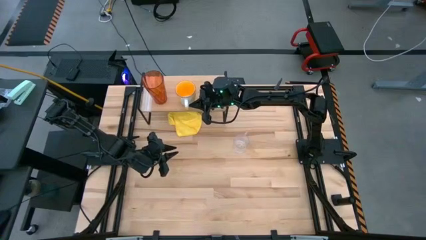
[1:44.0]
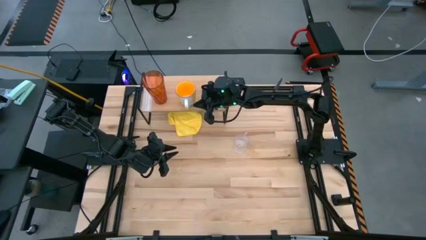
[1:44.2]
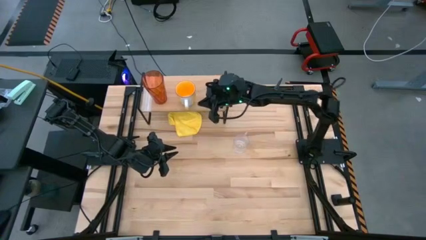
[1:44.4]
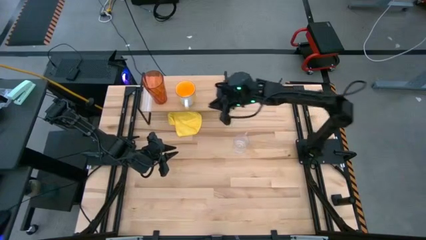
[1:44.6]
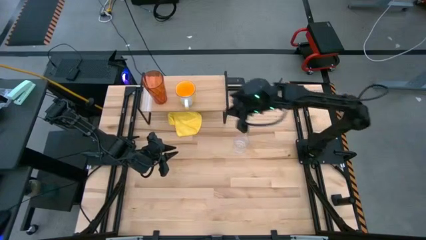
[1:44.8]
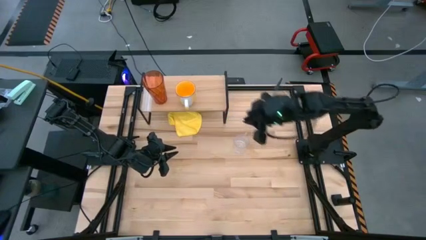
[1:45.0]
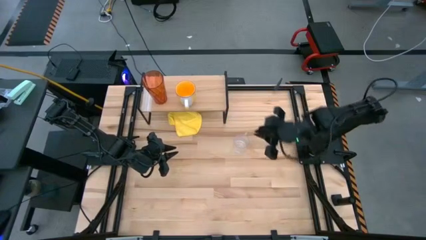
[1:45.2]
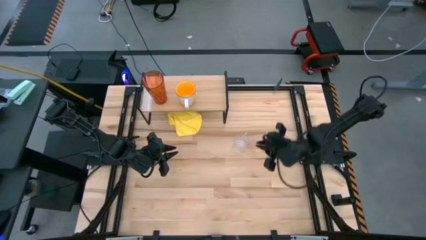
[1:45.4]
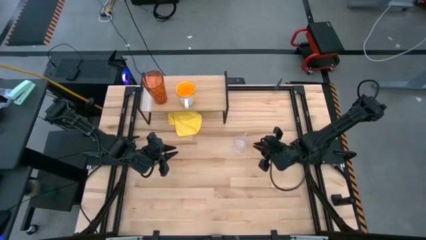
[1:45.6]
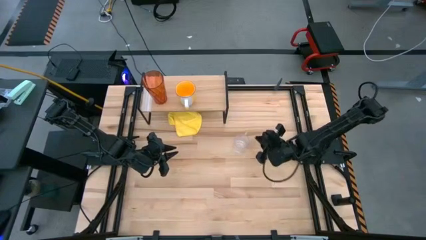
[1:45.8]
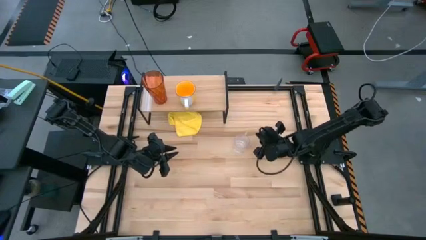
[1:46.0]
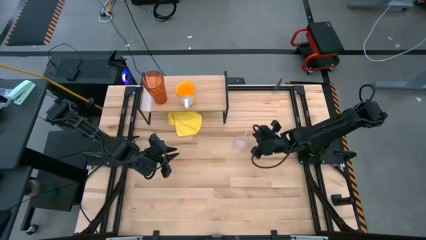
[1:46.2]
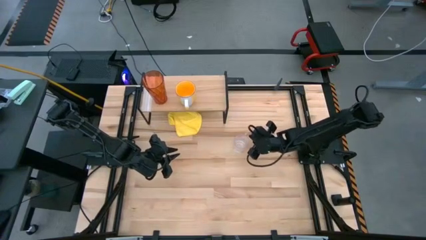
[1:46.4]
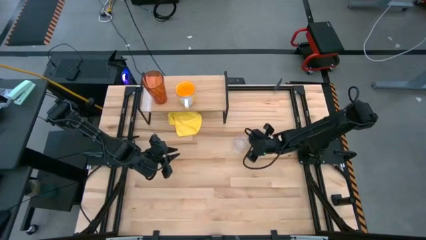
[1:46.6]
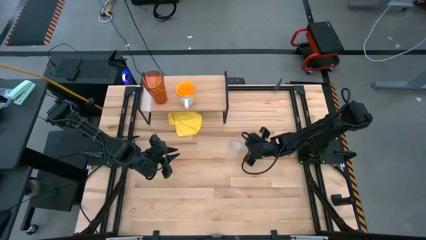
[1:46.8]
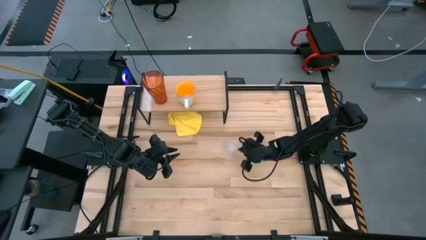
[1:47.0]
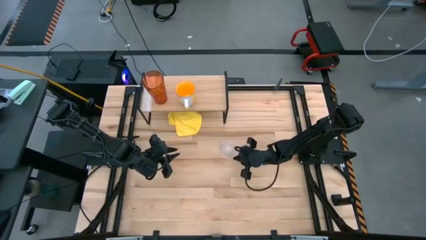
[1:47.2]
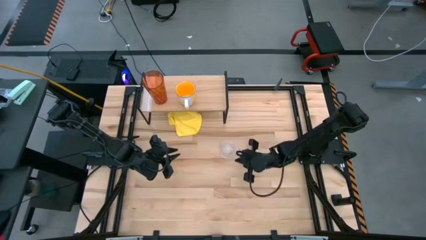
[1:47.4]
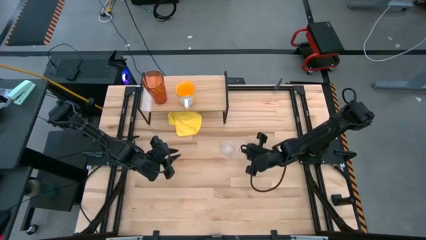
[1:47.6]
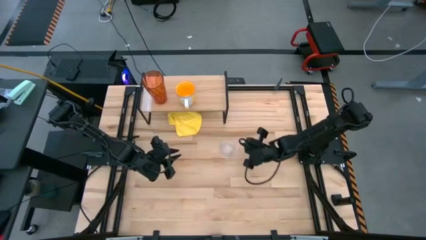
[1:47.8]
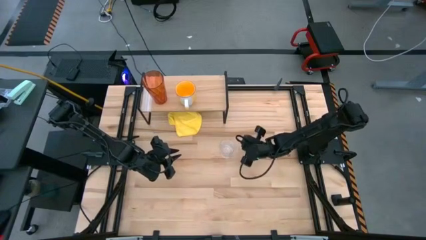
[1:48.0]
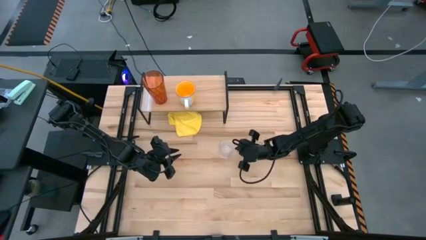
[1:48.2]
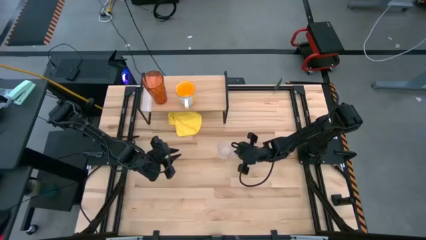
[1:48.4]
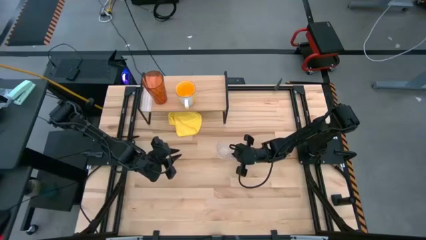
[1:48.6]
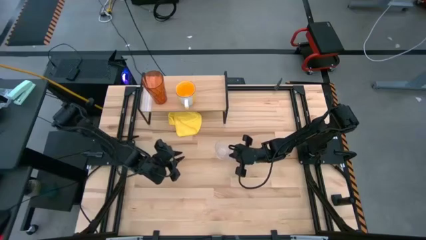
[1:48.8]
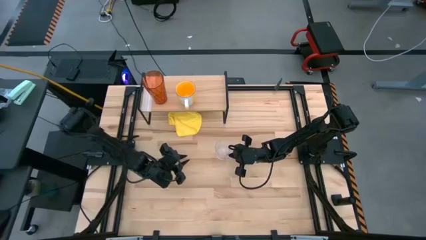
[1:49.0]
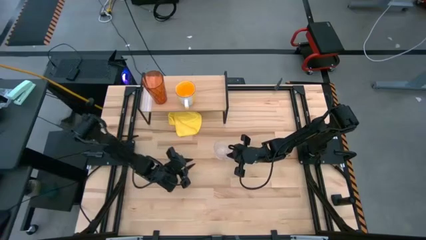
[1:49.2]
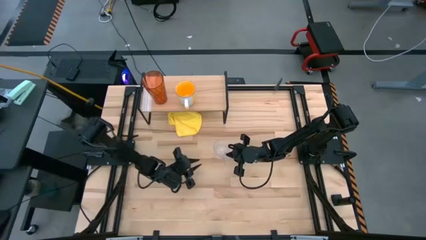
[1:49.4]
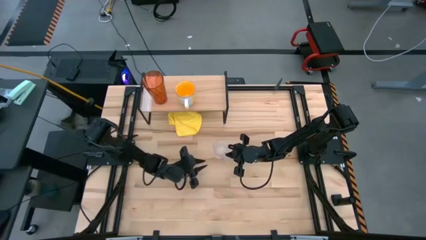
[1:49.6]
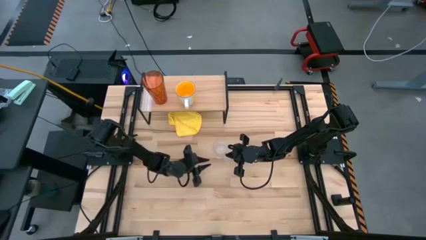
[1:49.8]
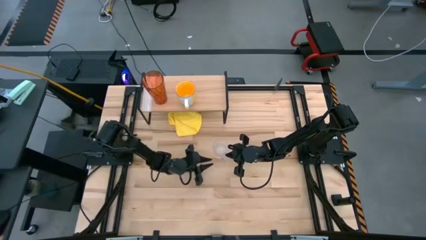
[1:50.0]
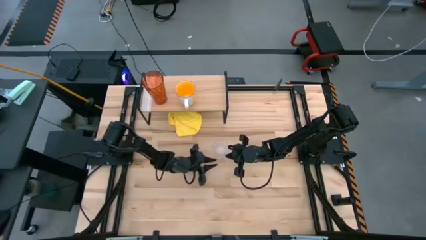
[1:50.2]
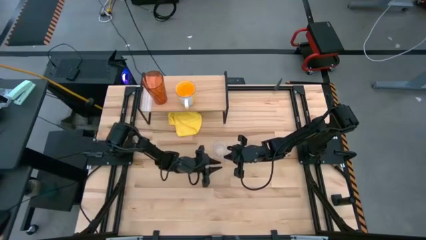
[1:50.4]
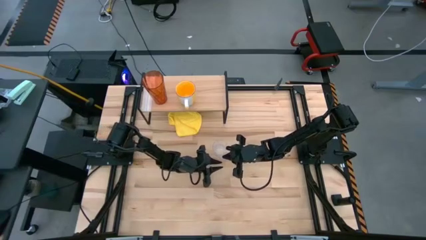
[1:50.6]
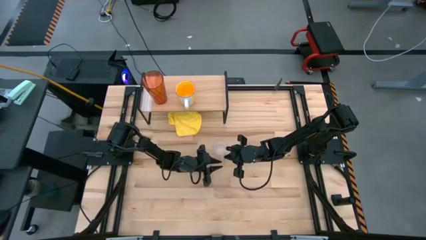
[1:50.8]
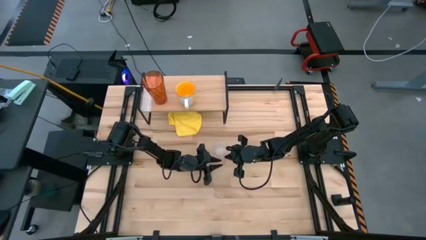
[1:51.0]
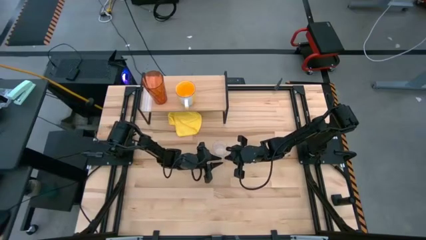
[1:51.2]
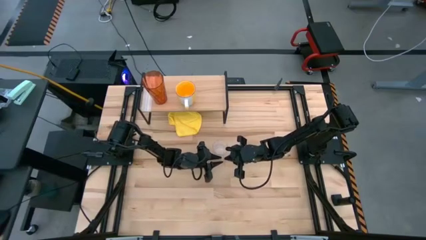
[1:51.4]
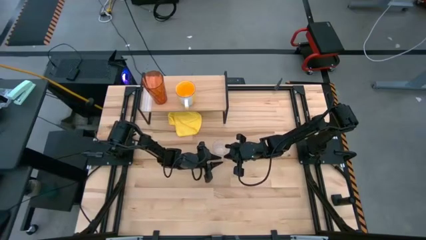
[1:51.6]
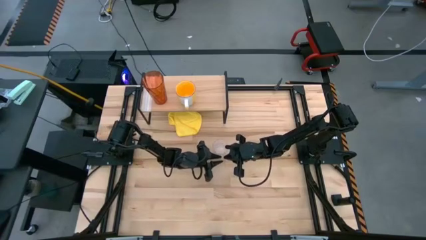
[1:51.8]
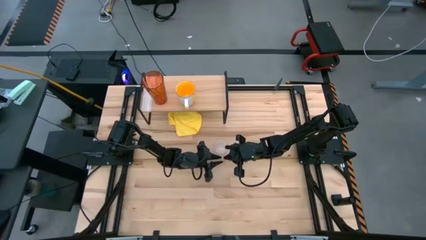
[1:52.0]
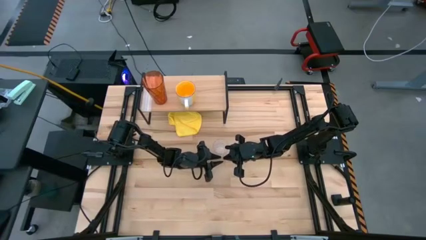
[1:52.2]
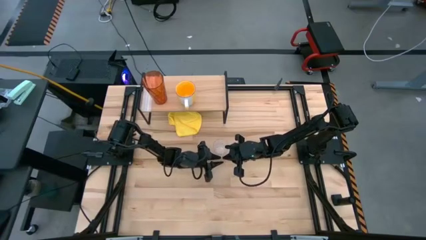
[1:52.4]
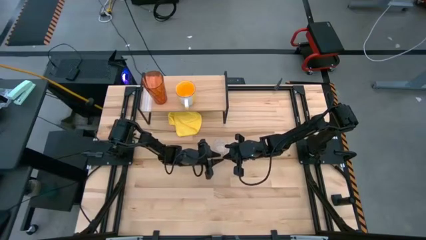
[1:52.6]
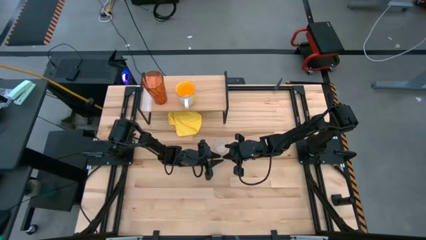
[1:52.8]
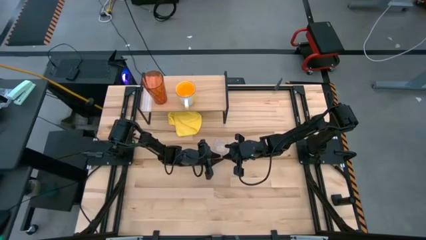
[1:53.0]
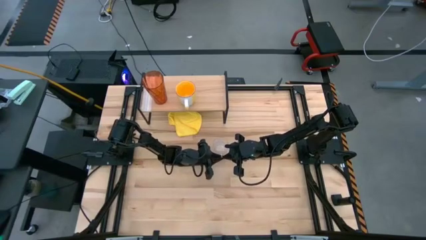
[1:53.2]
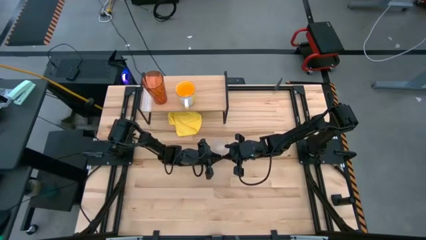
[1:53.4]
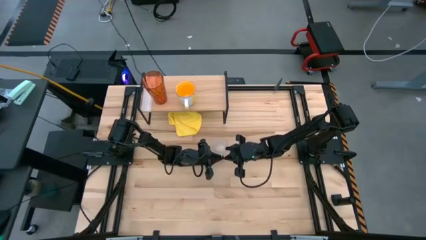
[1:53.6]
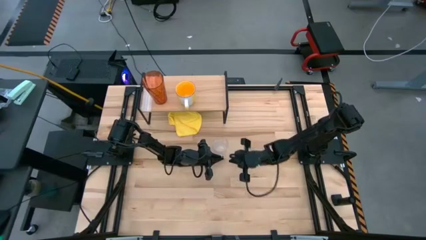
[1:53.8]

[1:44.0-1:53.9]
Task: Stack small to large cups/mugs on shelf
Put the transparent mug on the shelf

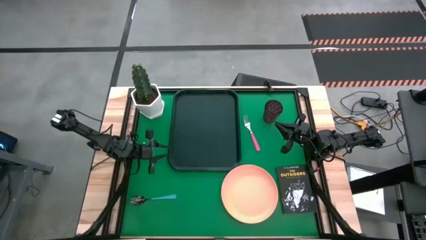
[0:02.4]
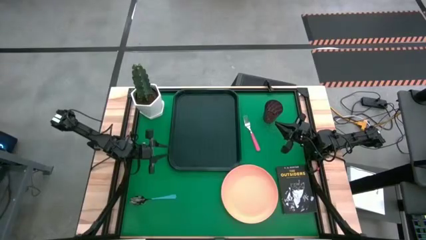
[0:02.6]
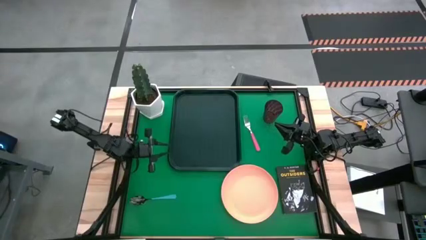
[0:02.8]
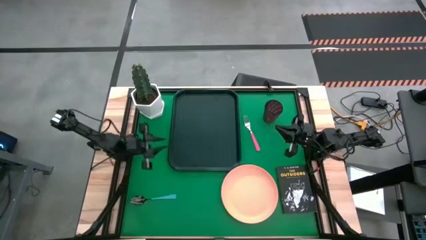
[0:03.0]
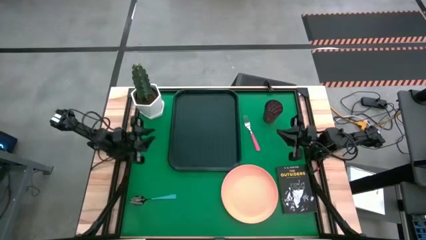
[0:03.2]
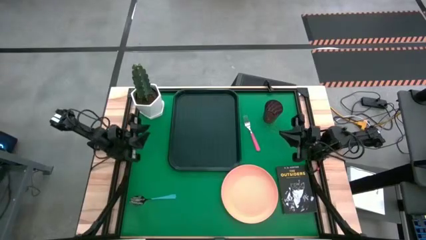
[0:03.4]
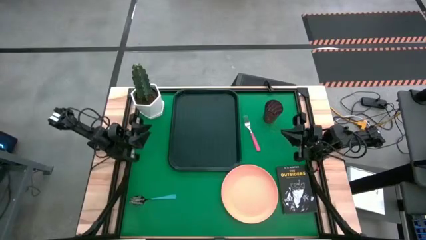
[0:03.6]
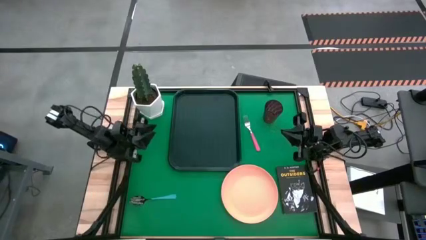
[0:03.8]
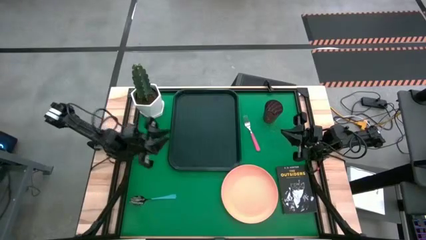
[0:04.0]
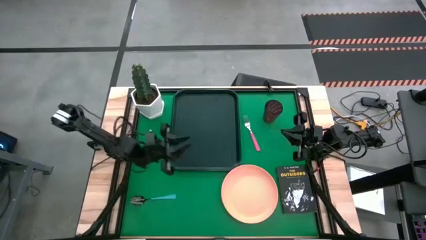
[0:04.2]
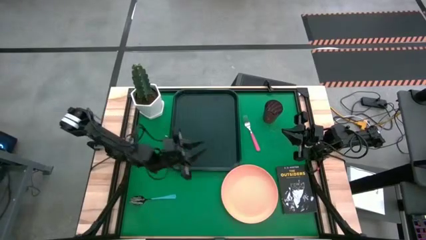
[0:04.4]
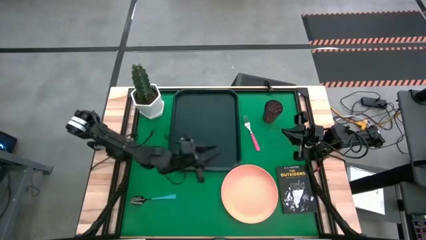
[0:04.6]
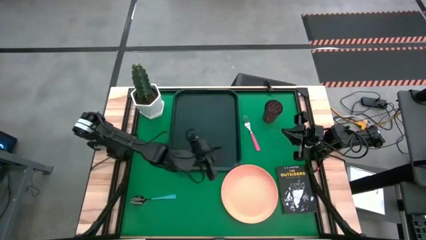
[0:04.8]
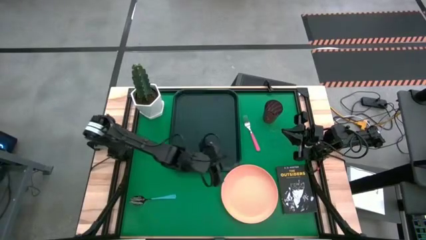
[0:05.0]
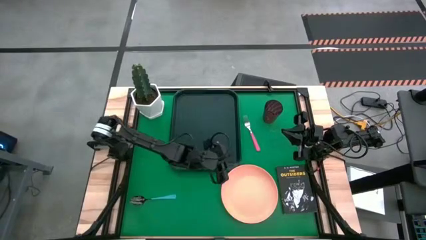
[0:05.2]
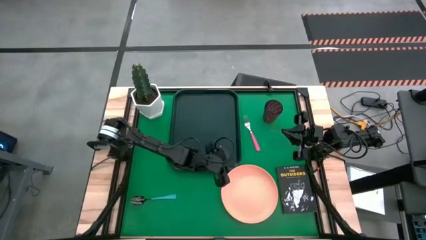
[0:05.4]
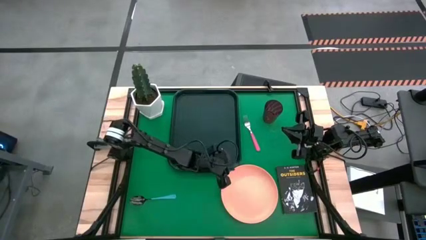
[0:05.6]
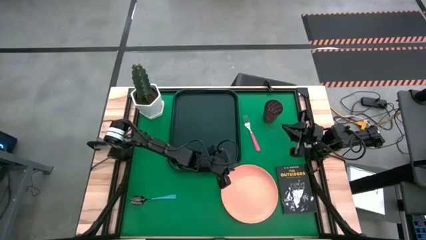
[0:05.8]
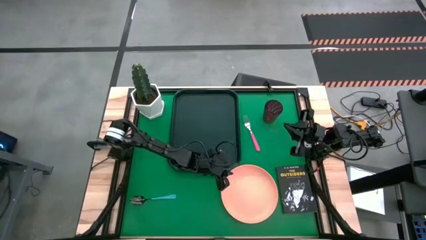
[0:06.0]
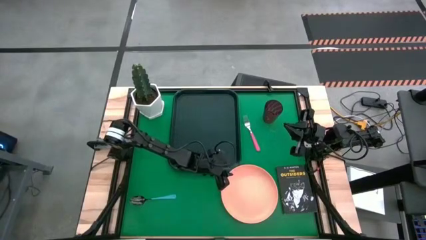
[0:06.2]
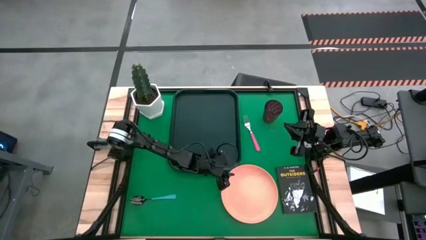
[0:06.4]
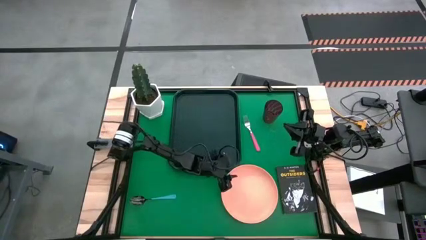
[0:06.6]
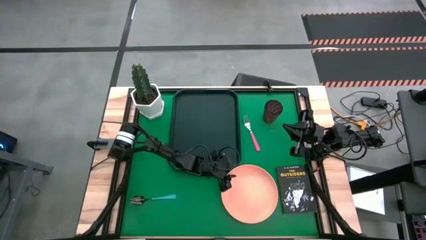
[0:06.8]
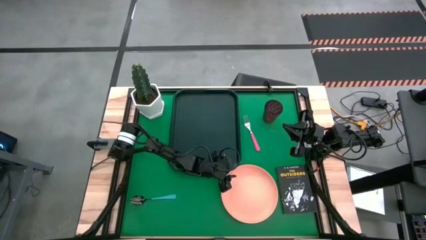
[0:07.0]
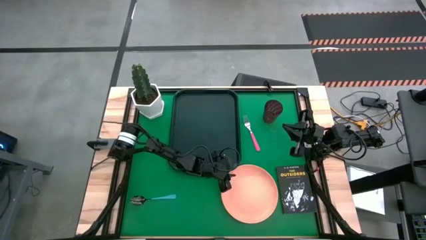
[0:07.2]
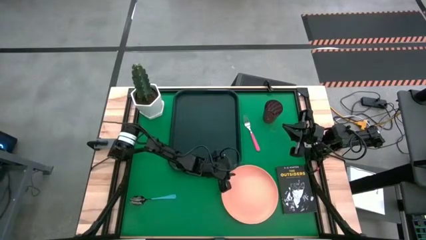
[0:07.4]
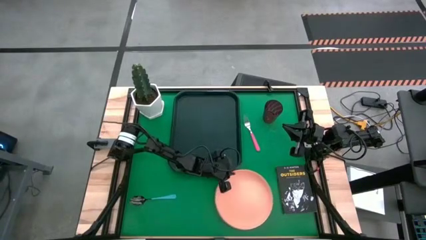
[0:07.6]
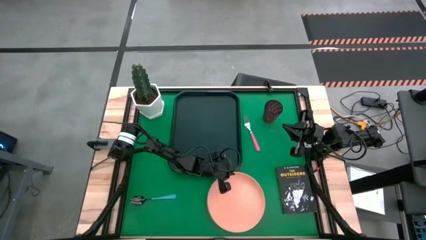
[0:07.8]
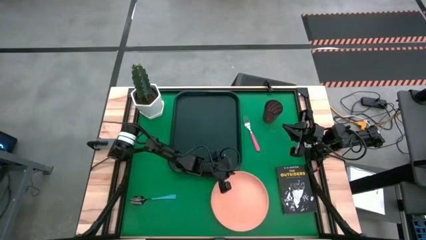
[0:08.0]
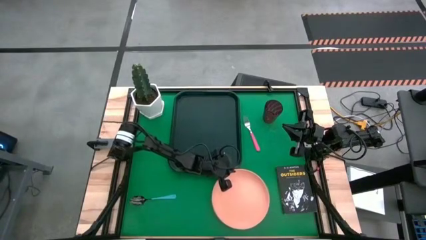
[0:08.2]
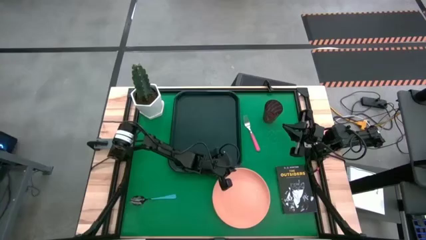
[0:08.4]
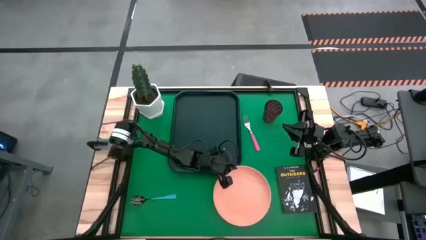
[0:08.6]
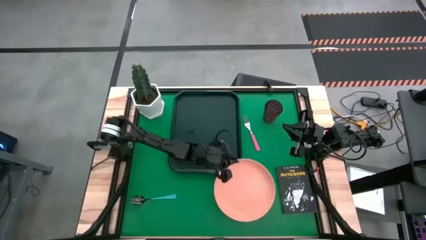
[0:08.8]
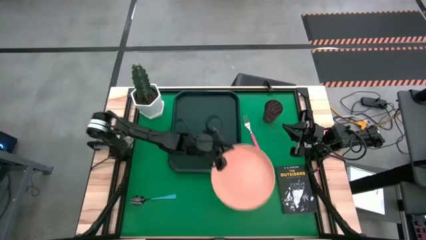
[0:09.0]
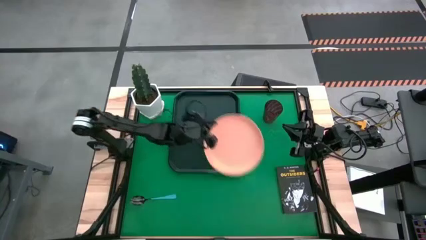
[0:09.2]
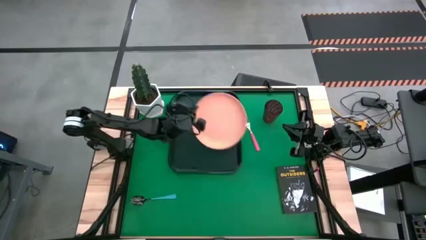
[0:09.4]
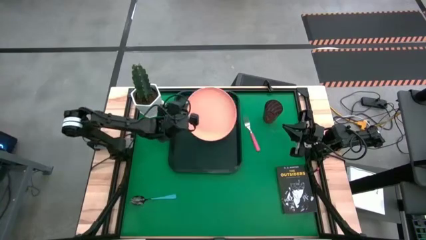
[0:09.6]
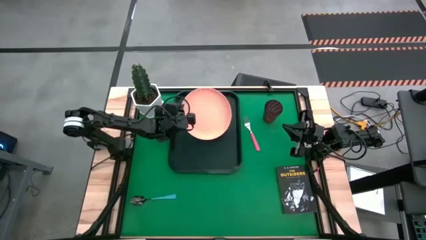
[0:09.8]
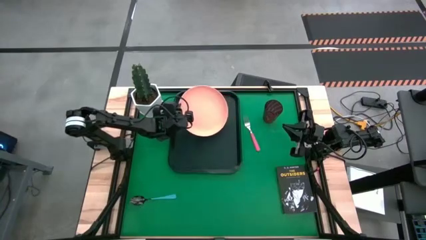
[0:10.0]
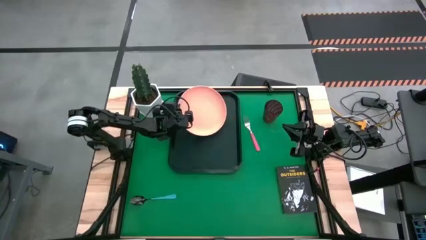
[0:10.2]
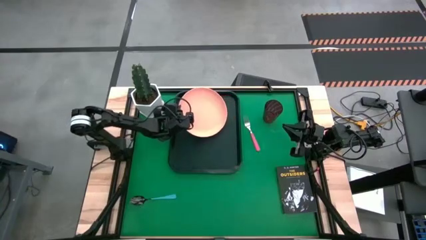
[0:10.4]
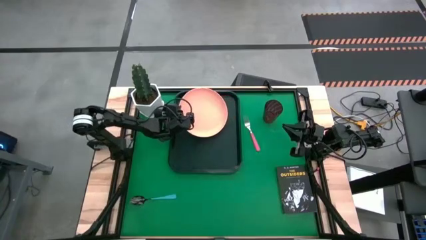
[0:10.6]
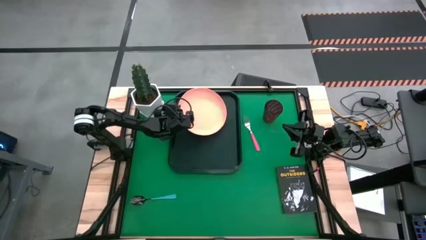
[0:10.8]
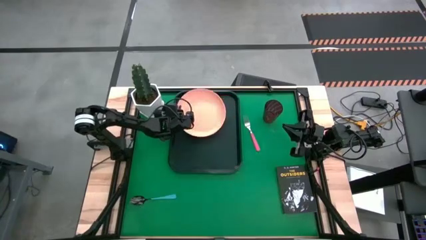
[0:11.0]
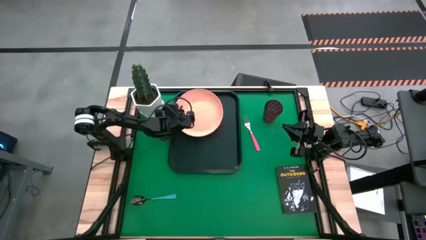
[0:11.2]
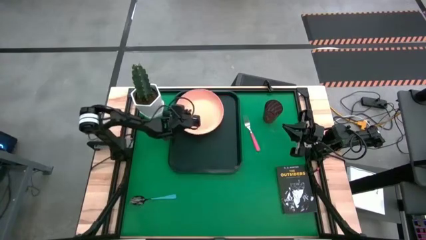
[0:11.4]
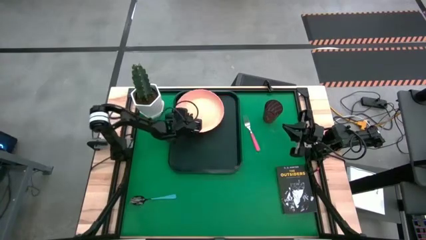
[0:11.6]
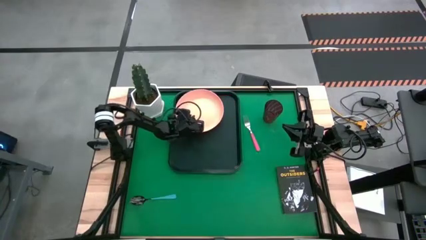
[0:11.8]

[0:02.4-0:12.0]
Task: Pick and place plate/cup/fork/spoon on tray
Put the light orange plate on the black serving tray
